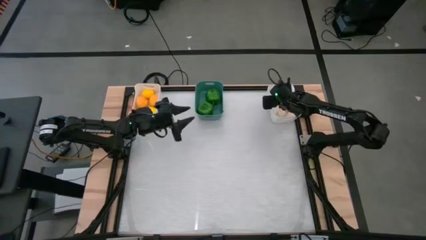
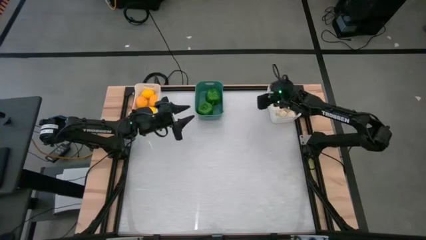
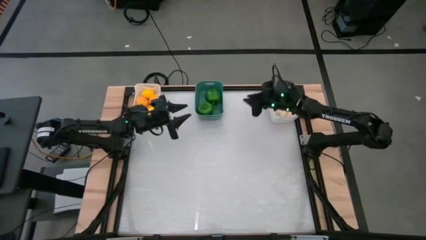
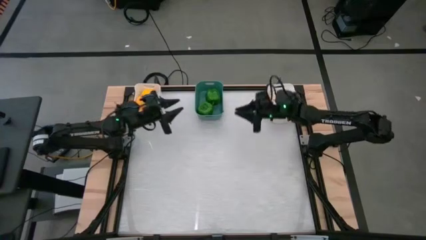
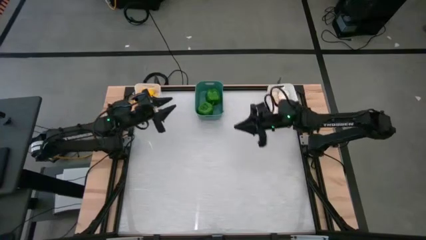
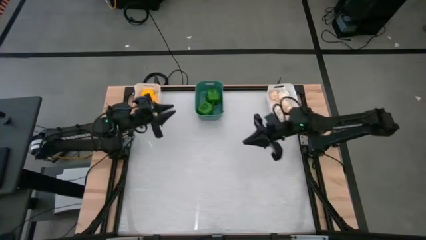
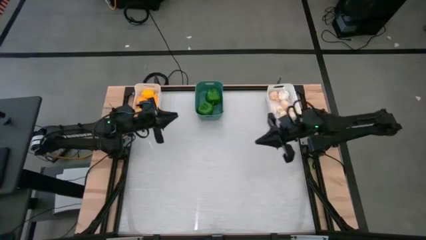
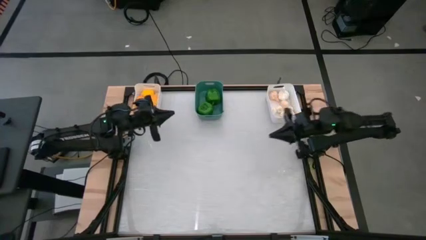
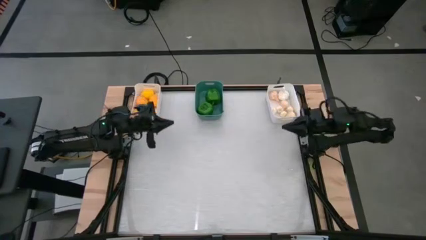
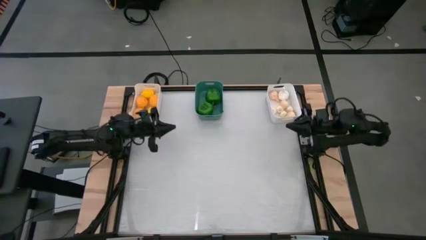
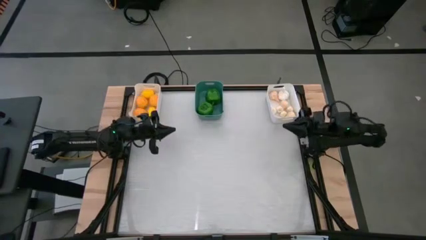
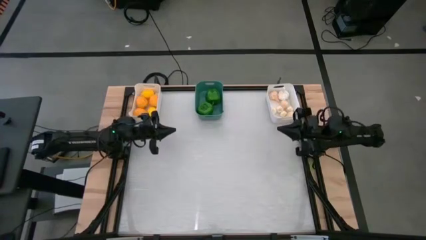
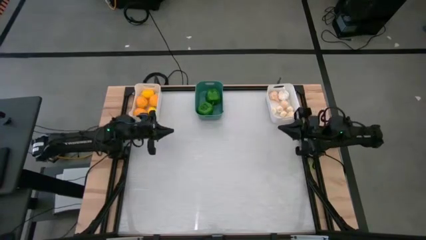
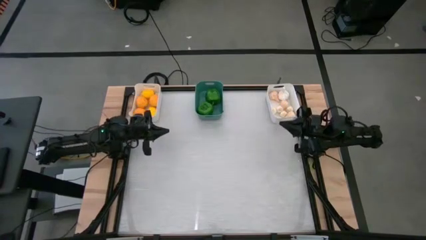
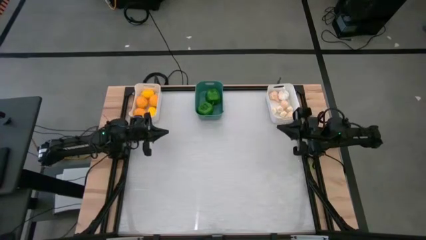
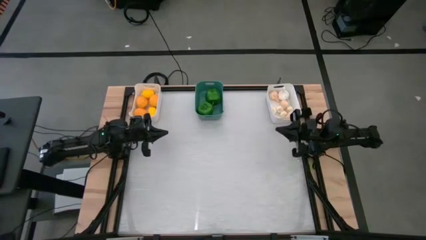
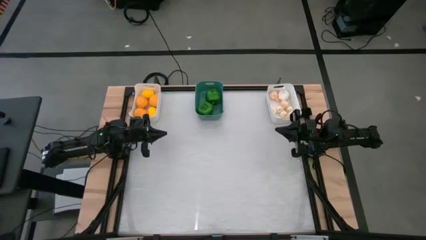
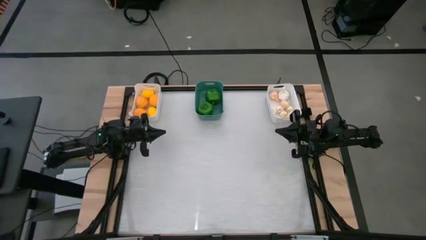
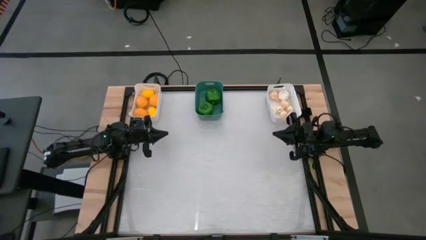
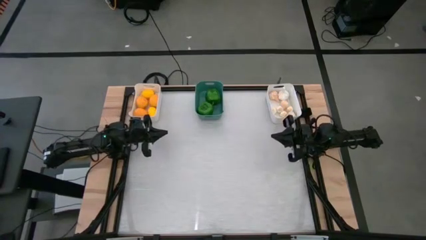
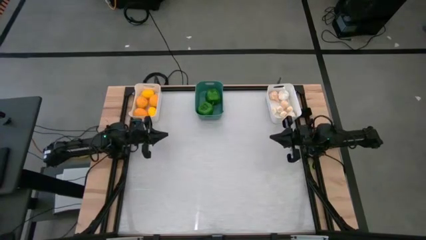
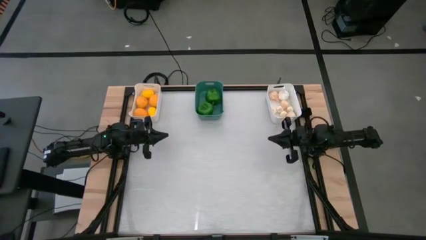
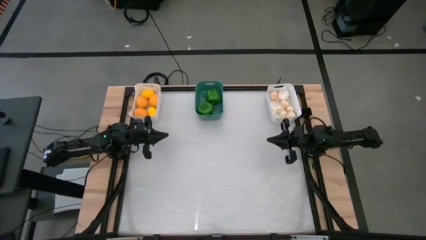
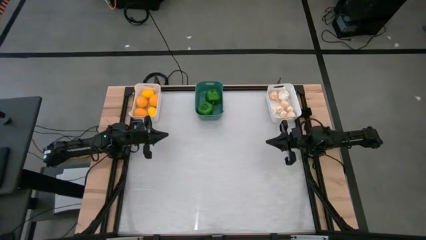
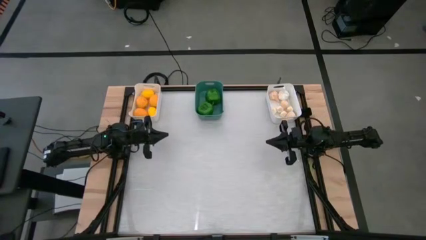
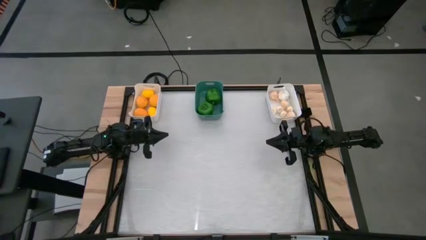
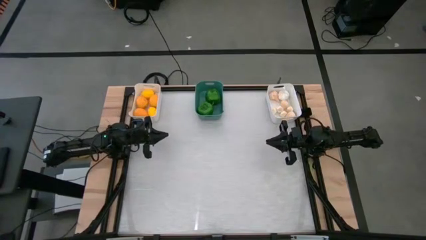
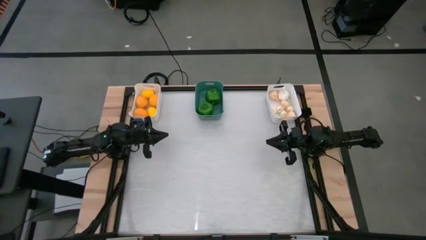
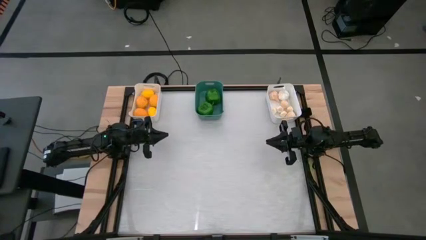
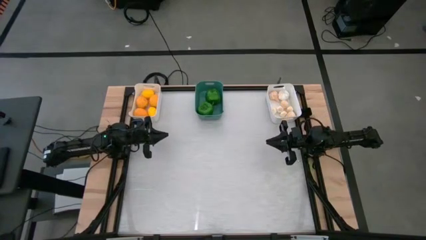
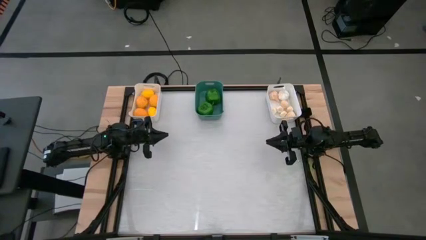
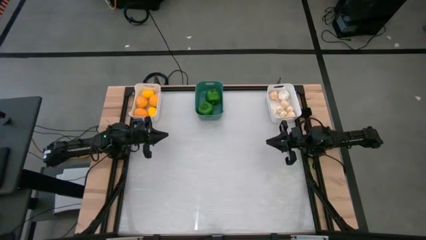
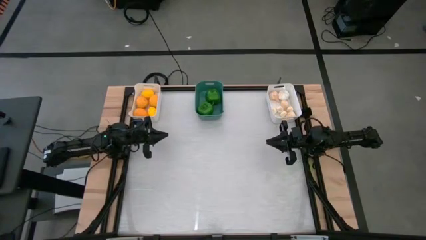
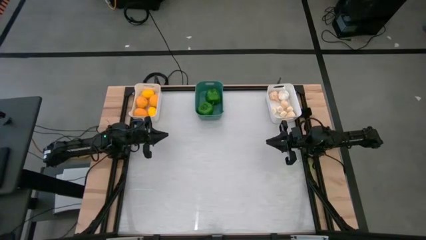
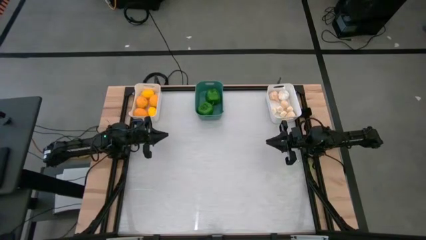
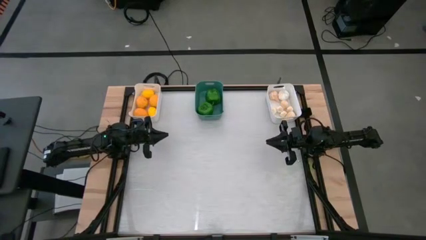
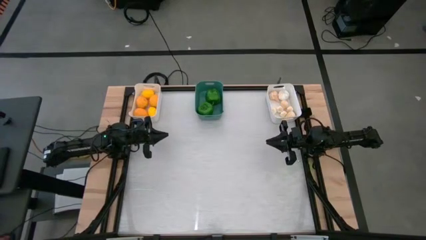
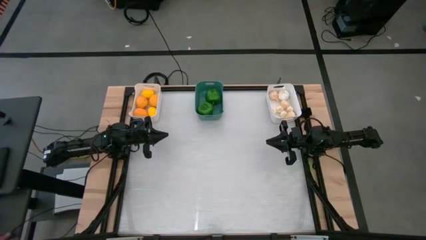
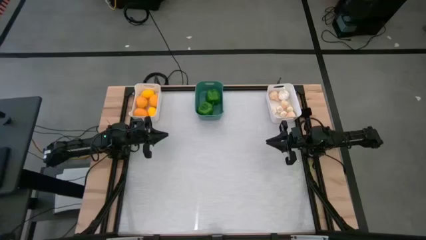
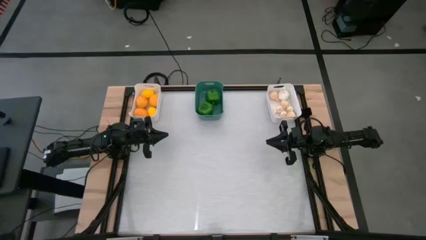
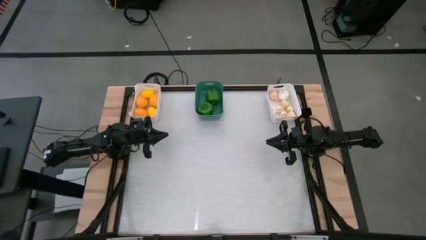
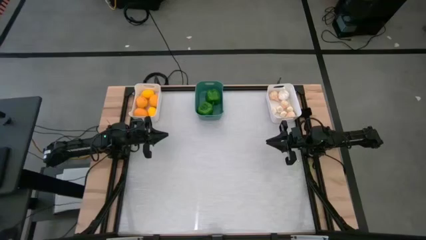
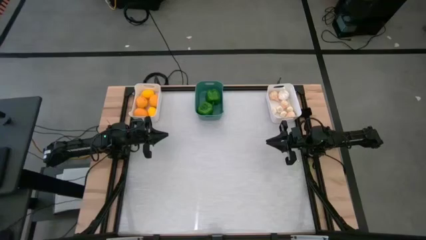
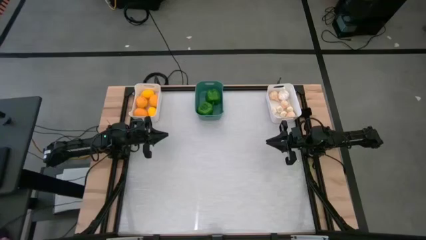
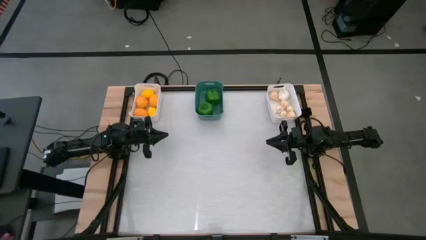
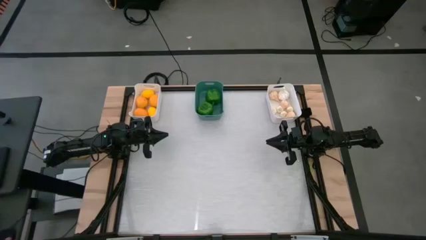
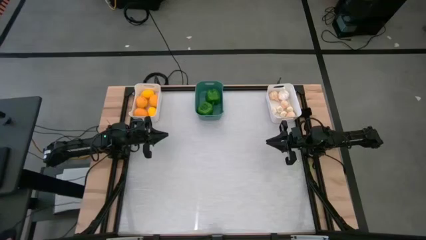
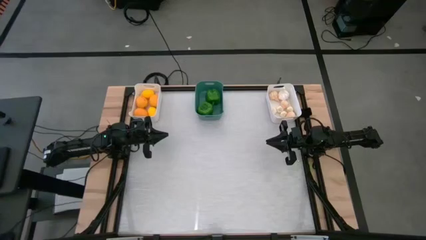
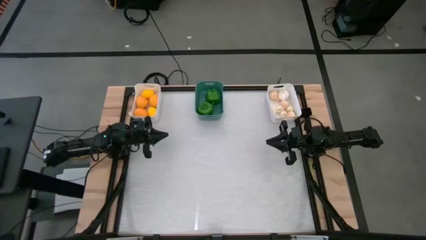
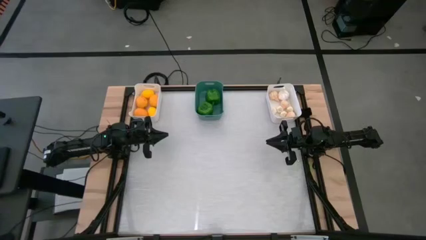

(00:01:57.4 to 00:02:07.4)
Task: Sort produce into baskets
Return to Home Position

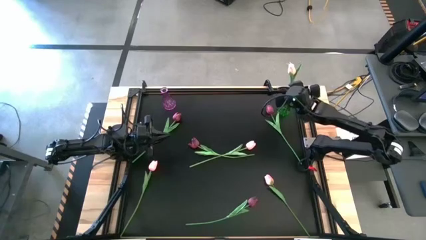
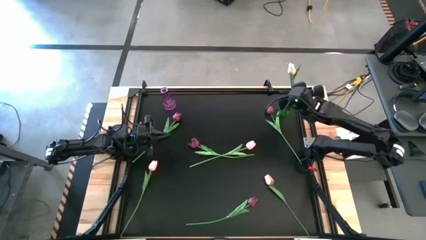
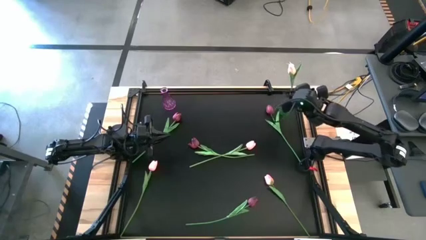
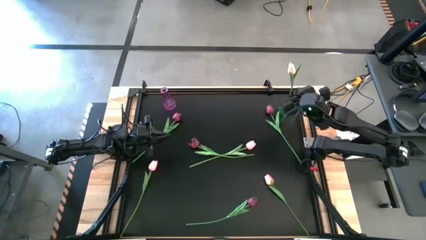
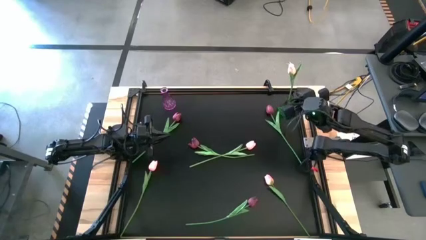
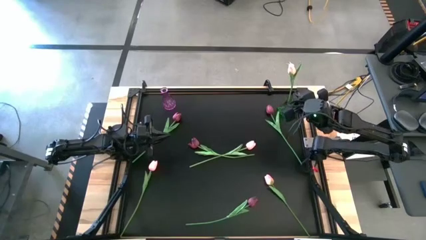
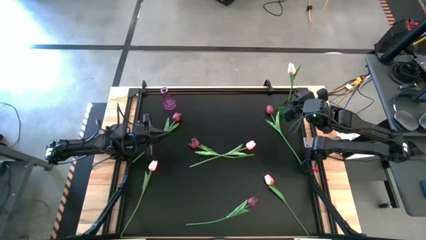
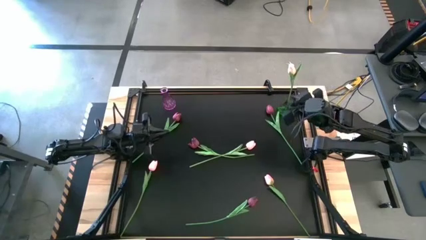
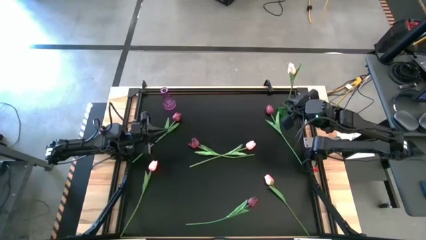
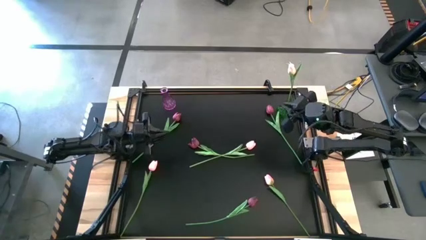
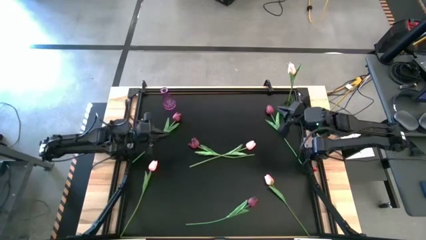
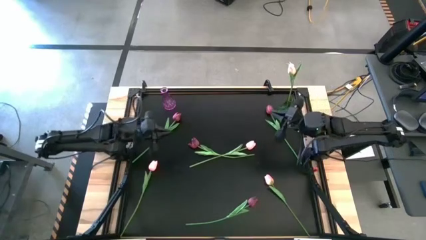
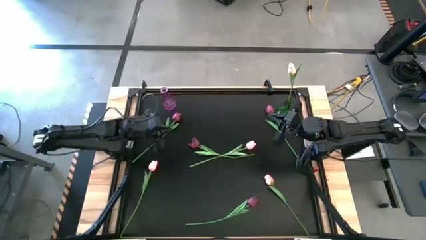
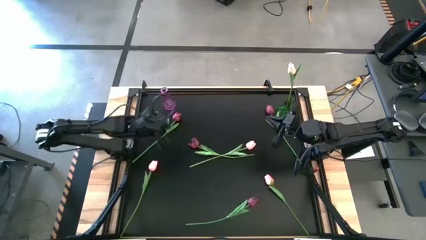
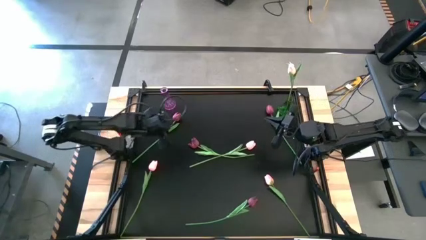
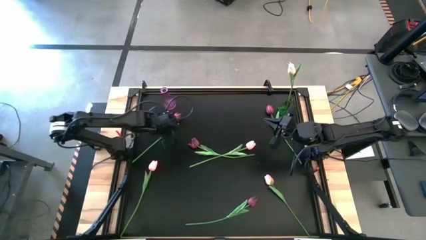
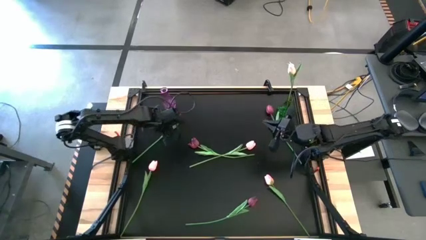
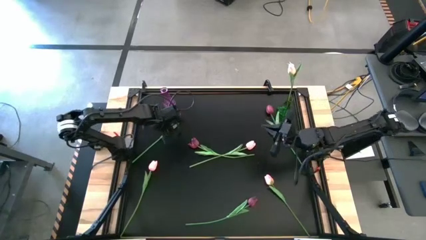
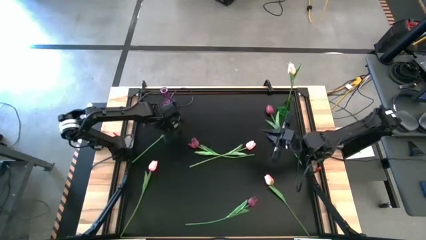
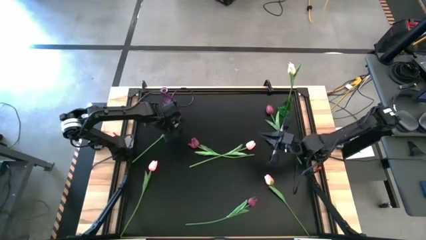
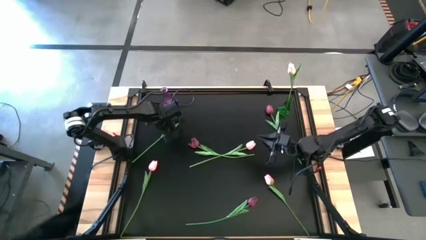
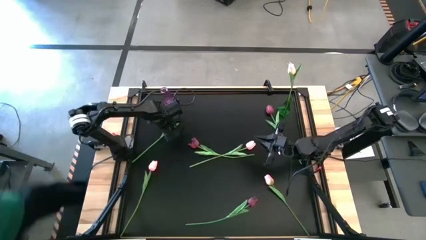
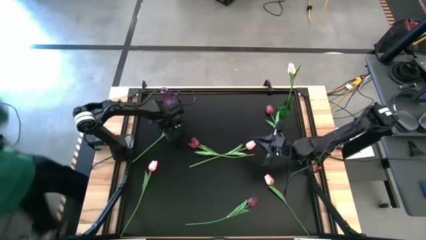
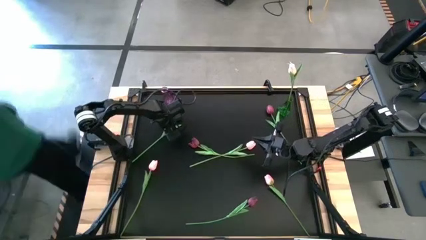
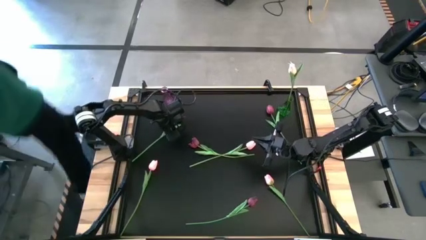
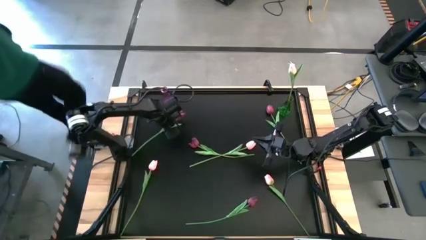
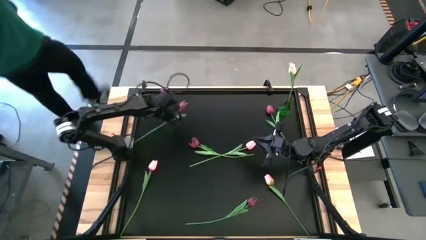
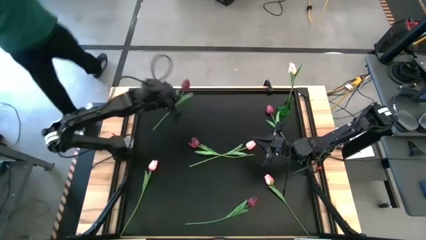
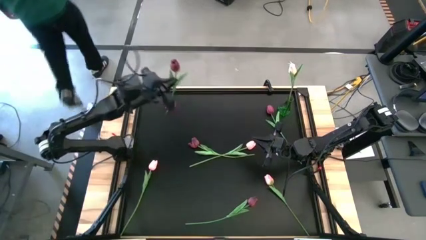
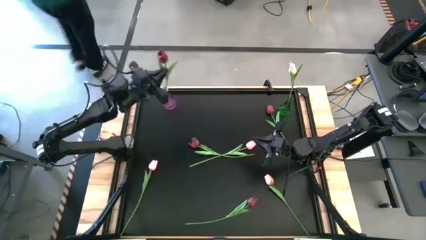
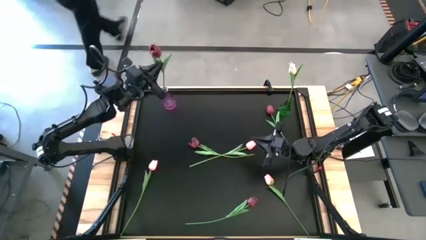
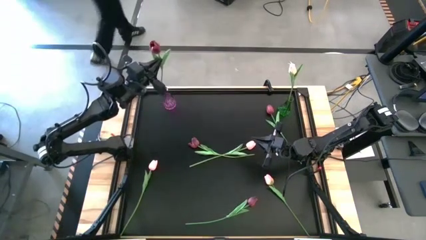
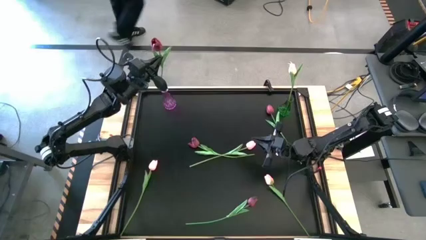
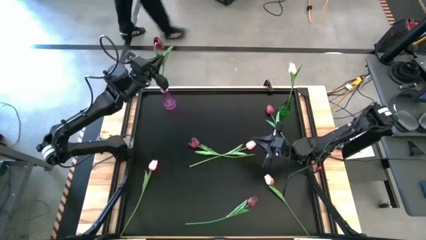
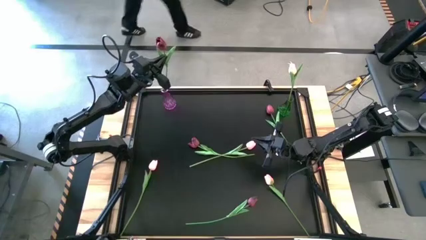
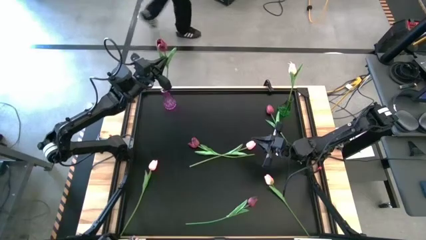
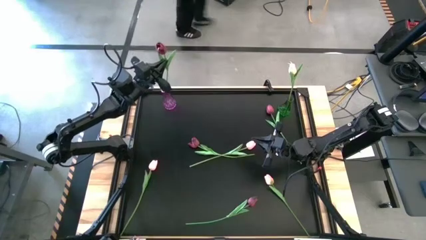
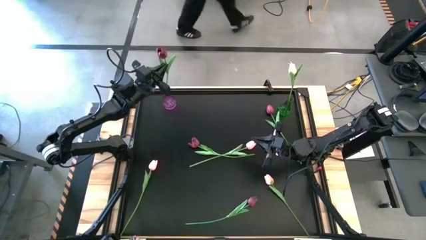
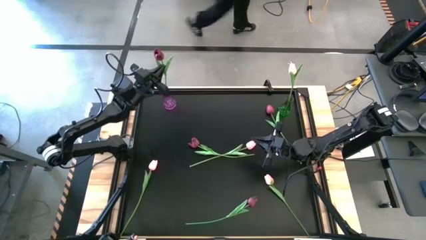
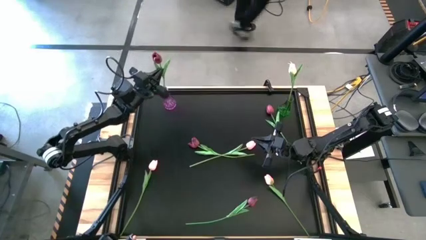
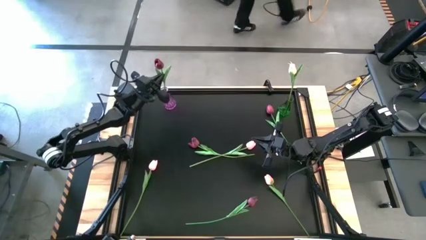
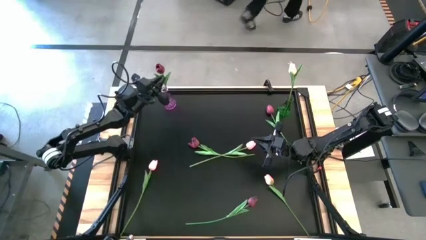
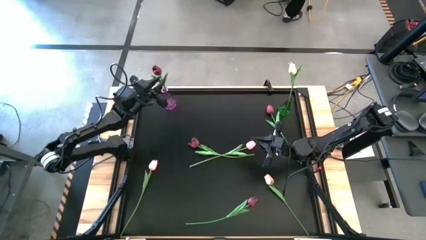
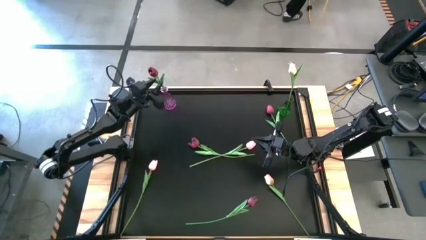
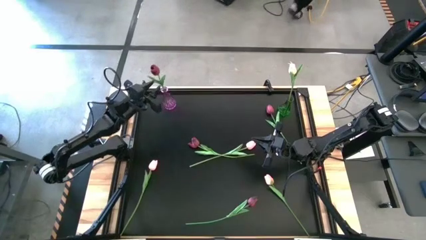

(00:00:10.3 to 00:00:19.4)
Task: Sort flowers into vase by color
Put the red flower into the violet vase
